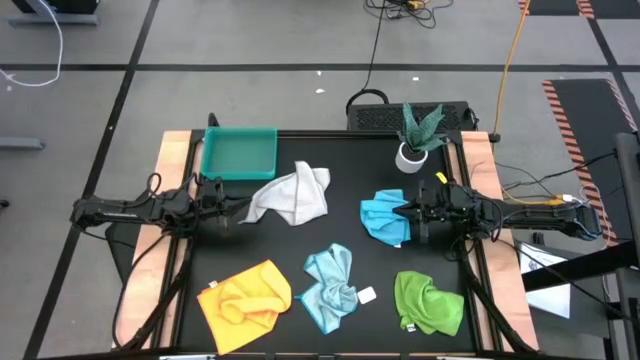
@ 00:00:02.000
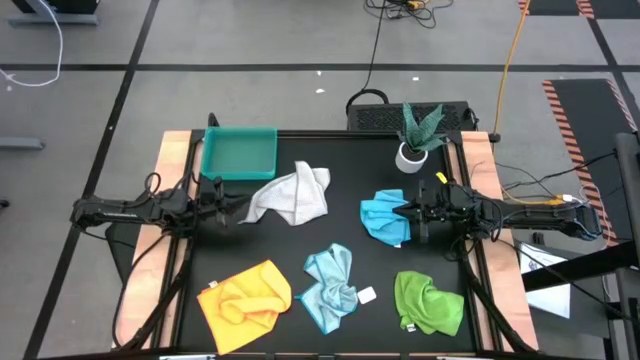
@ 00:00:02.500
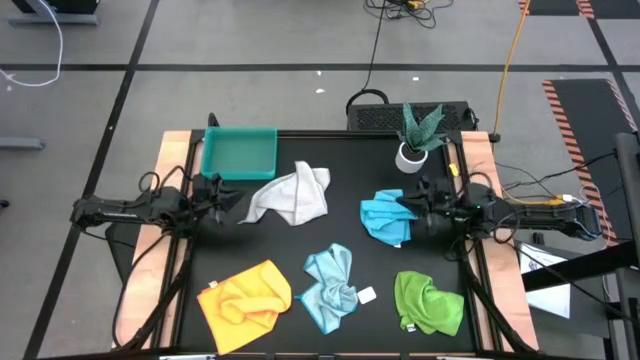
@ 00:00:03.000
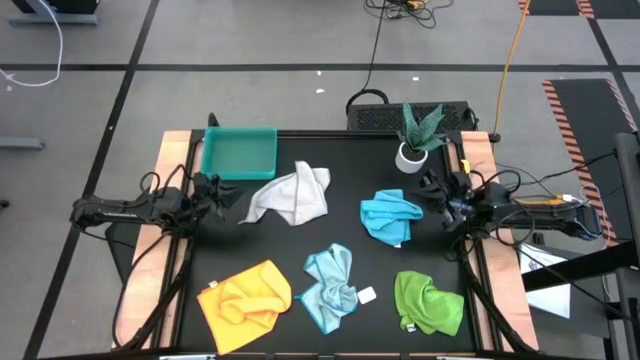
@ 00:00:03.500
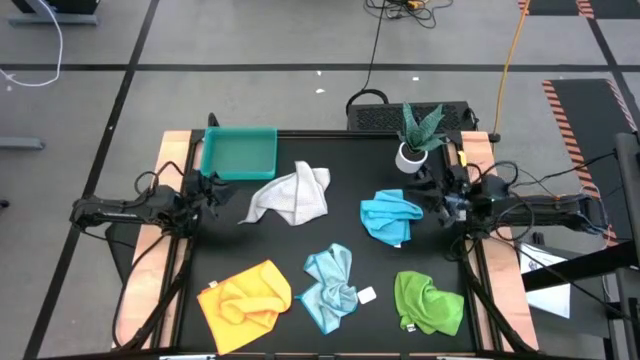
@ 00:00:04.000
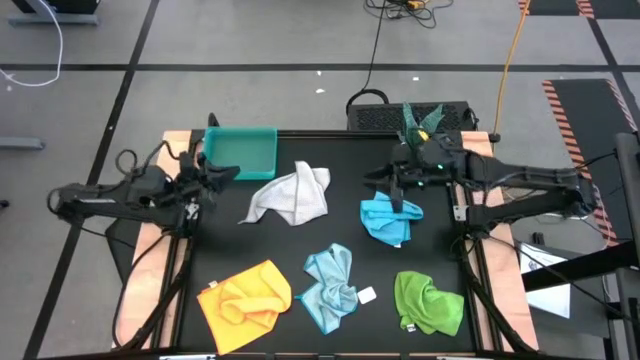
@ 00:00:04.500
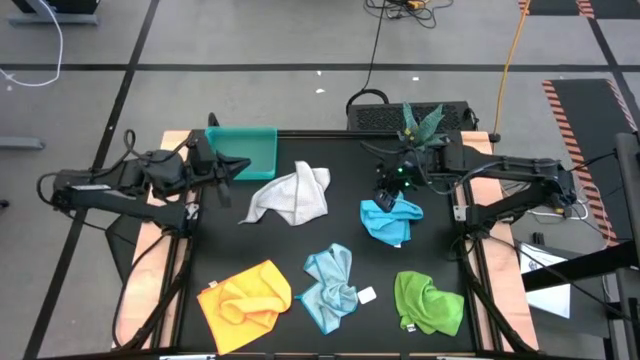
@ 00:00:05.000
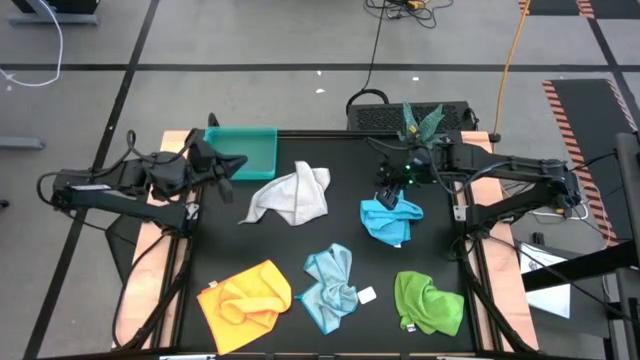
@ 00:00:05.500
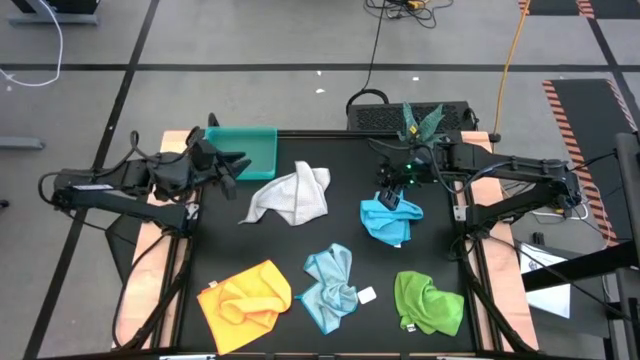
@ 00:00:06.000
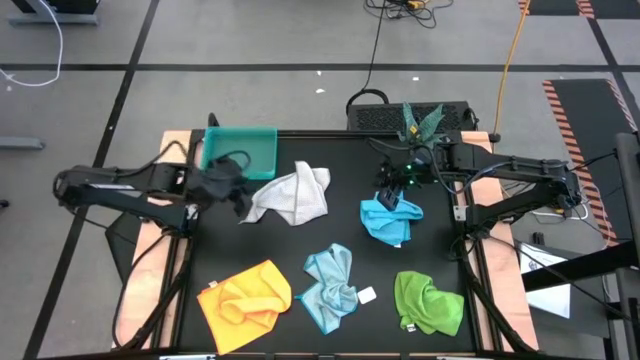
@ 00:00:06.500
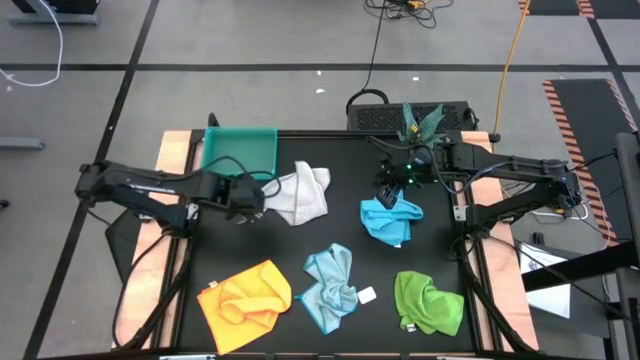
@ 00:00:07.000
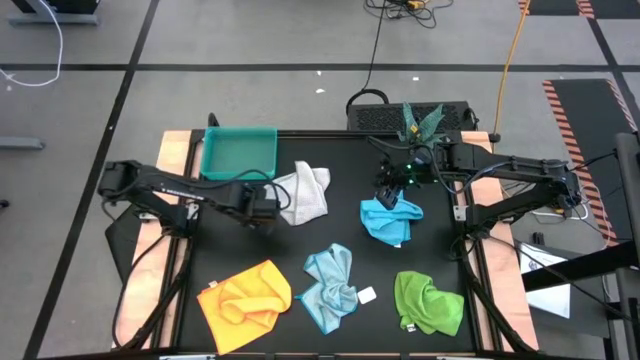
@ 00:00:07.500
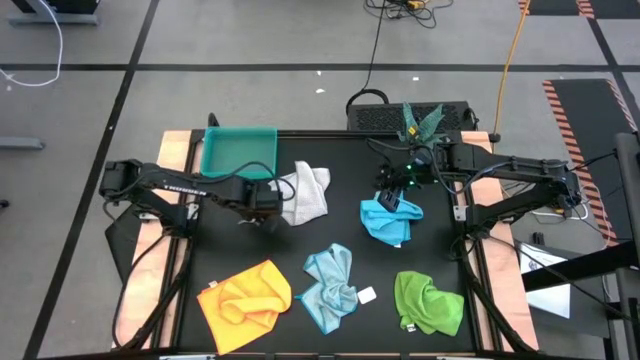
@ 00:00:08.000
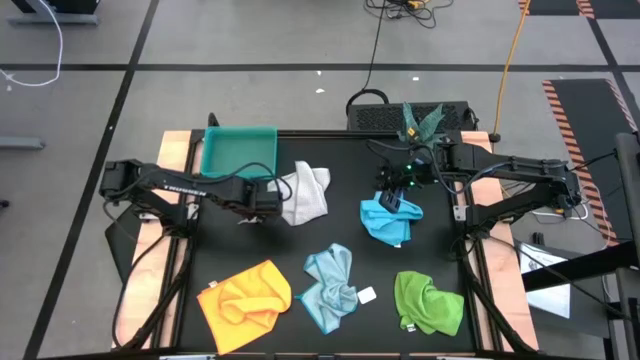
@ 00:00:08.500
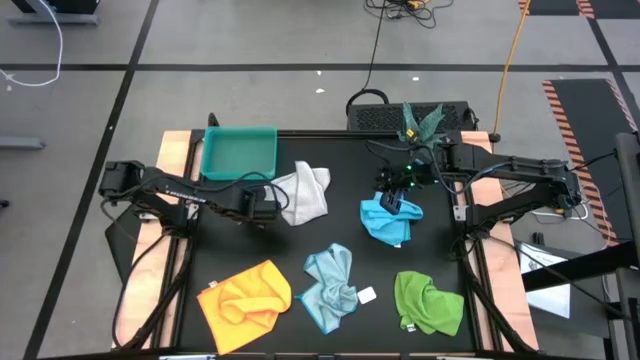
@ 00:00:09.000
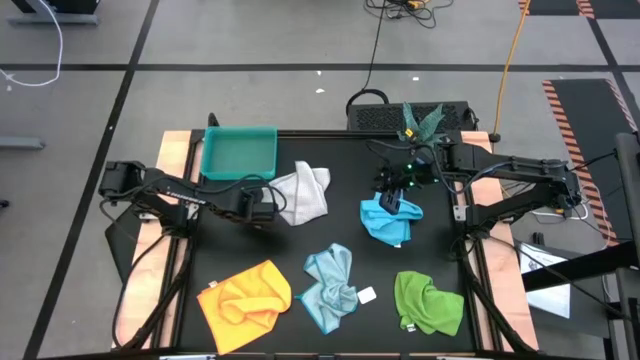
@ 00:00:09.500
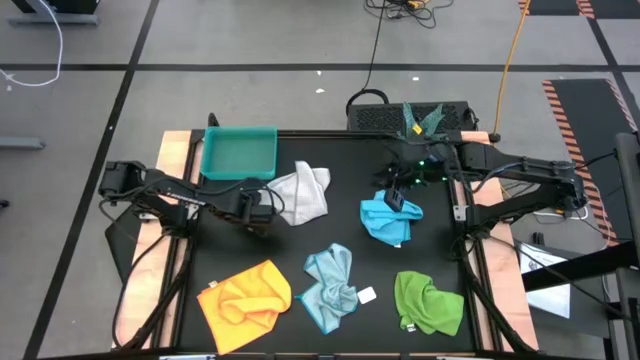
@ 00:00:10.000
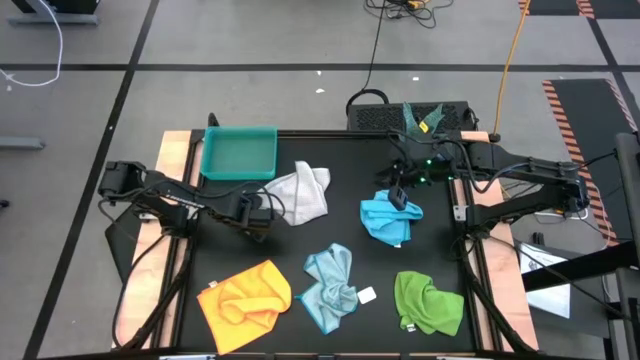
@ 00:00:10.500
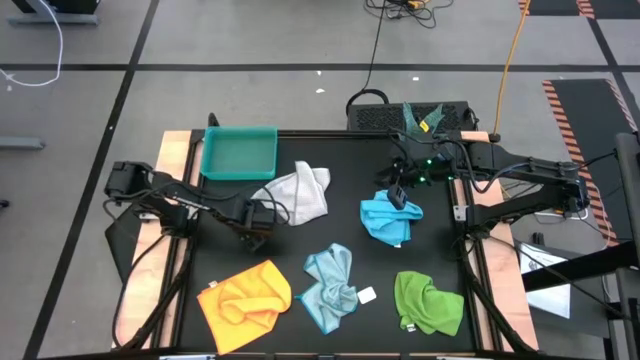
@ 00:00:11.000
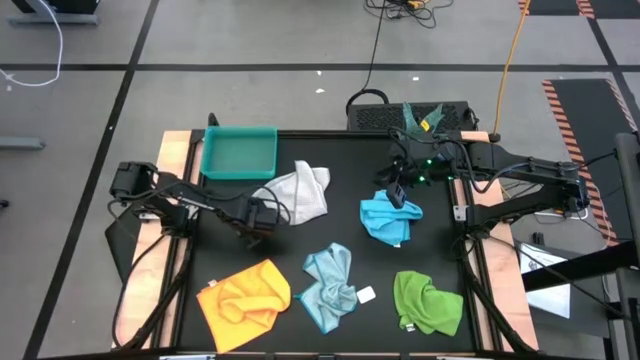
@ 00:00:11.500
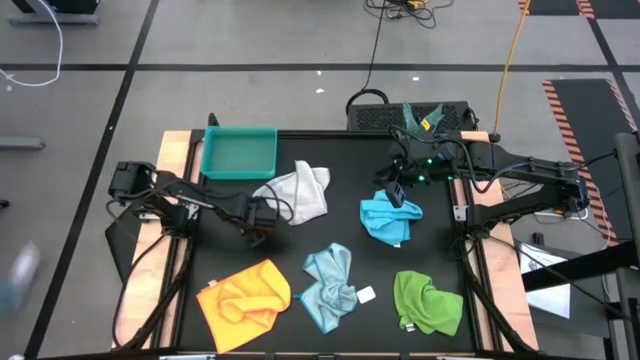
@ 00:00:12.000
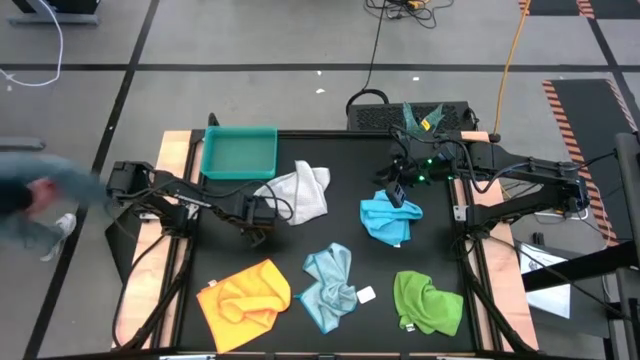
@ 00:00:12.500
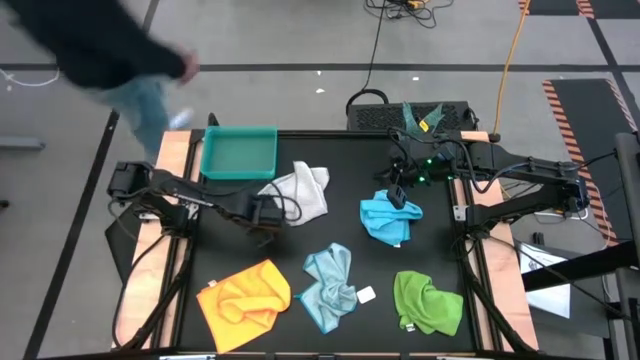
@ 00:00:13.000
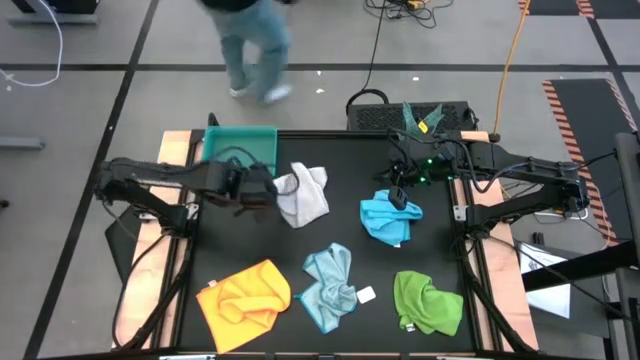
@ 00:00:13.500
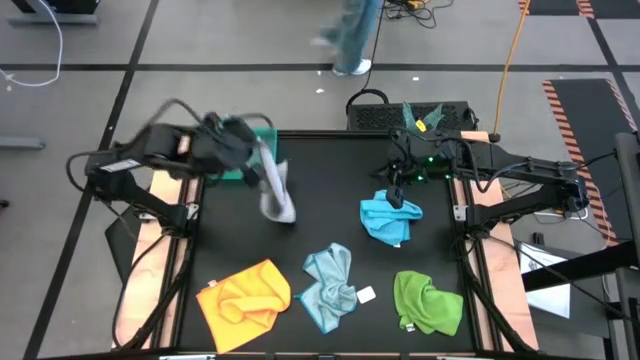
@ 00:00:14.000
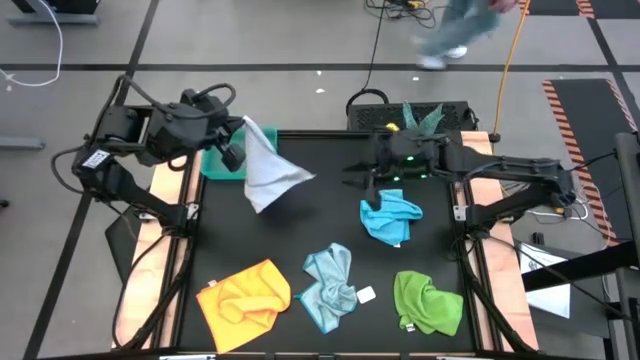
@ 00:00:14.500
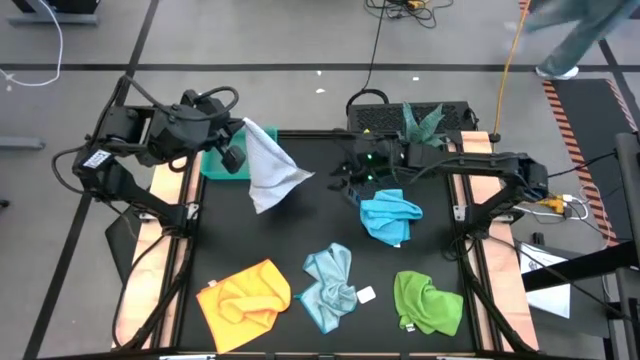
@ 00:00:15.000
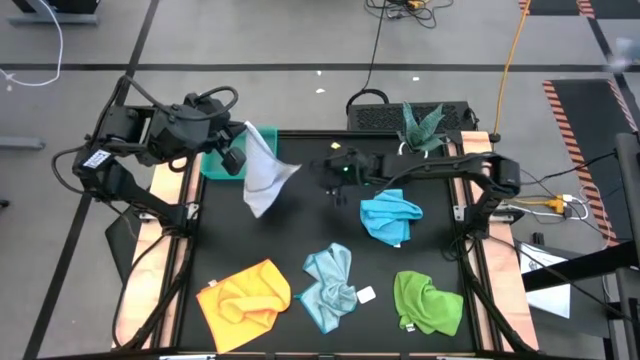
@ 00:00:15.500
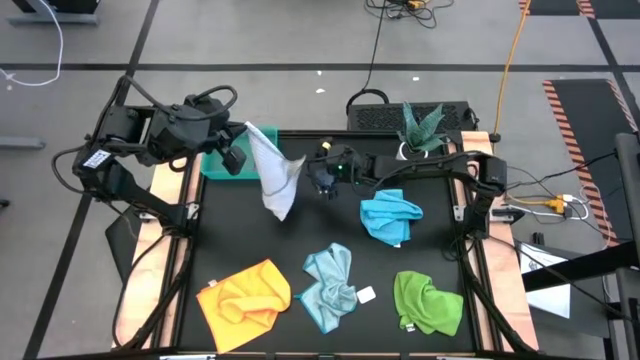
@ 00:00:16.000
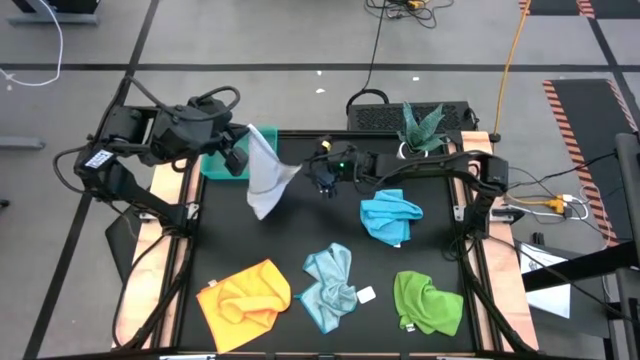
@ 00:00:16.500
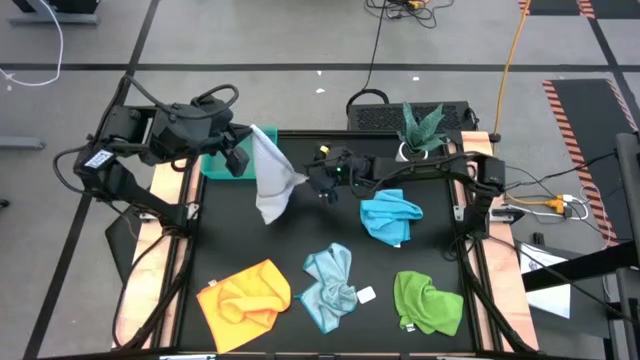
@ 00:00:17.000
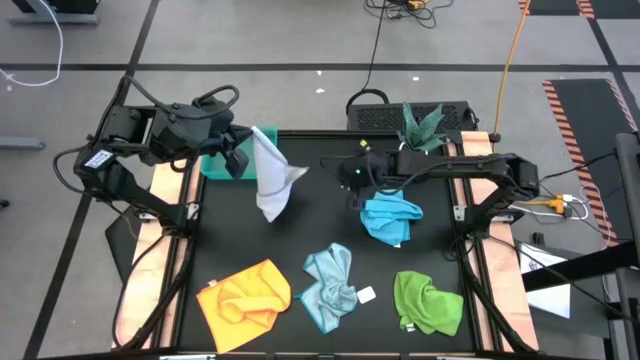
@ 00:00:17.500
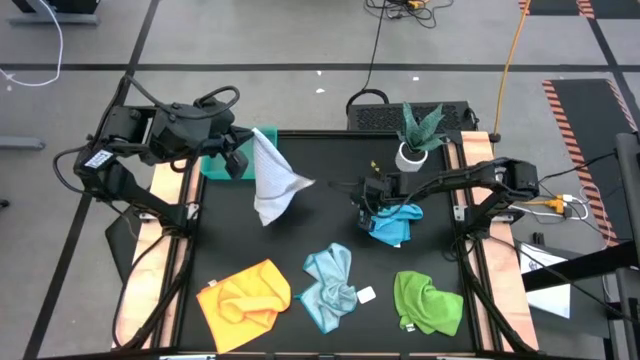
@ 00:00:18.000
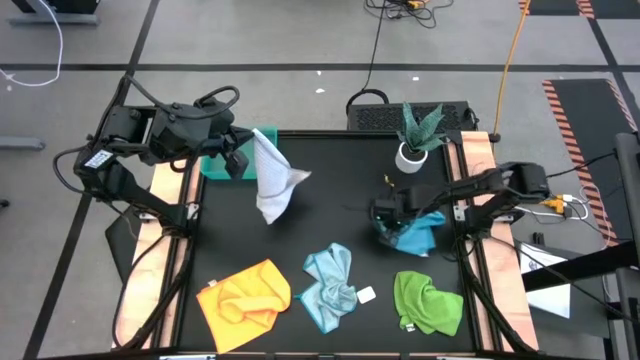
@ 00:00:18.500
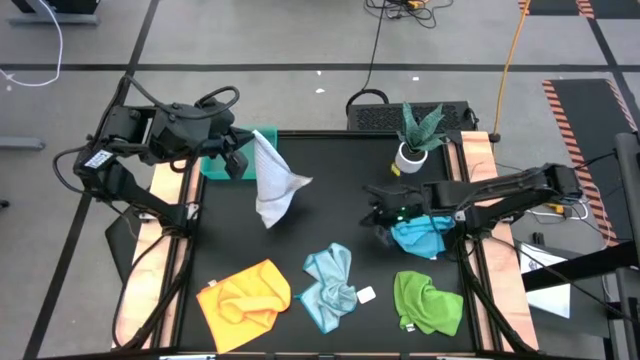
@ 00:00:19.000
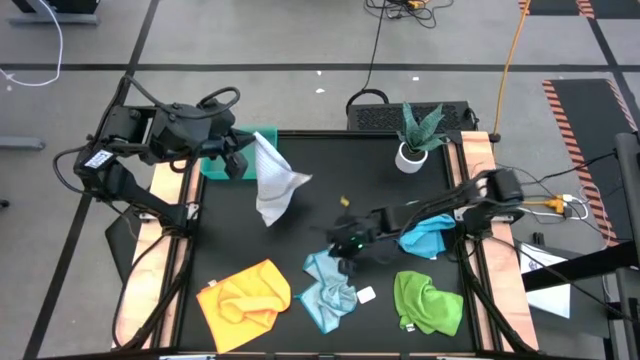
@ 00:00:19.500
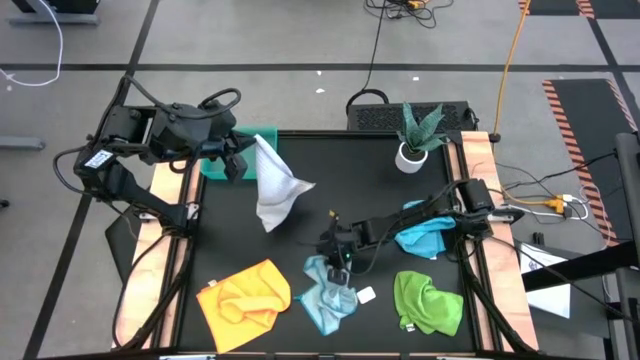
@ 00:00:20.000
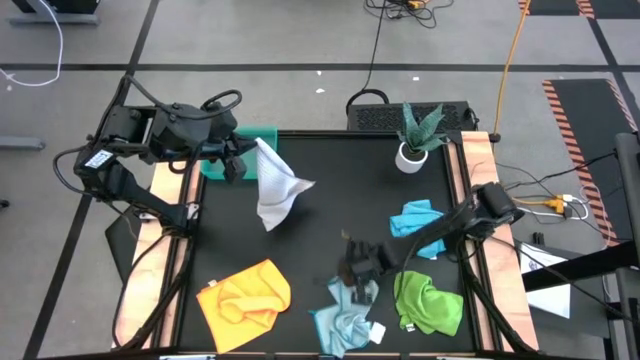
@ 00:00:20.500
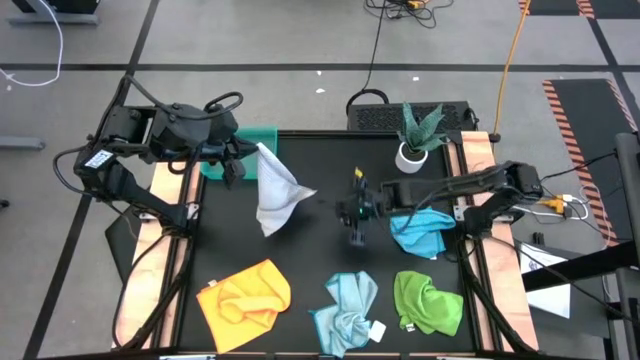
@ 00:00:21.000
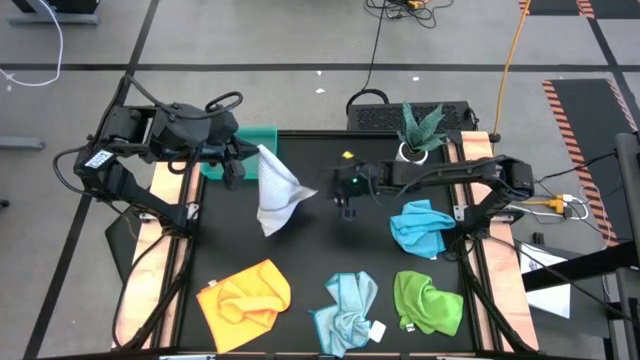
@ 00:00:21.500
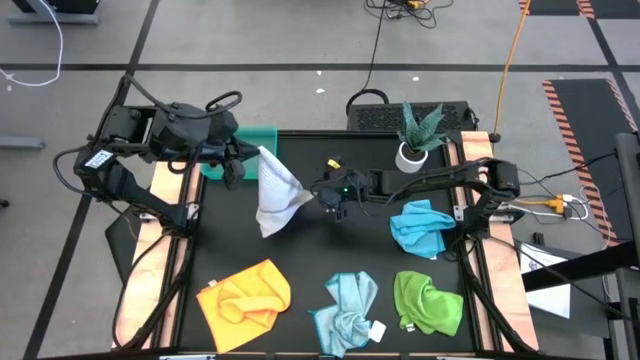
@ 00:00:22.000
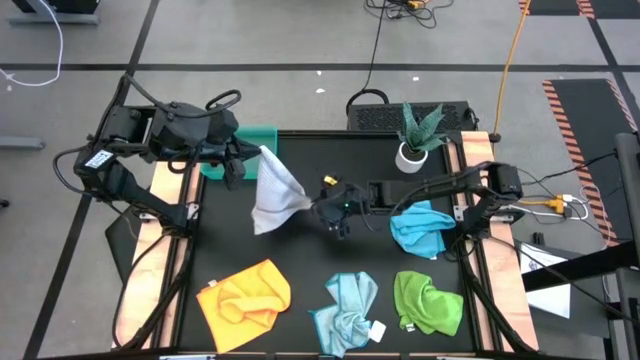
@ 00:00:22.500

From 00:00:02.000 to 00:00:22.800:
Task: Fold microfiber towels
Fold the gray microfiber towel
